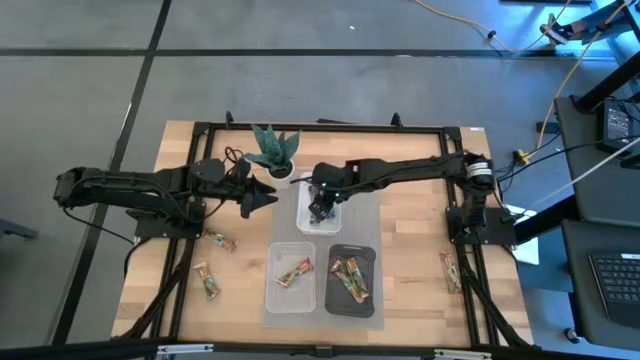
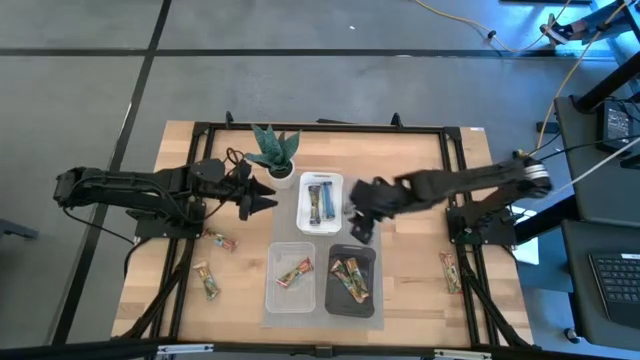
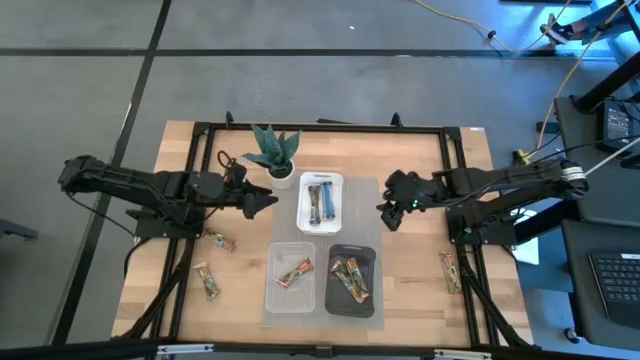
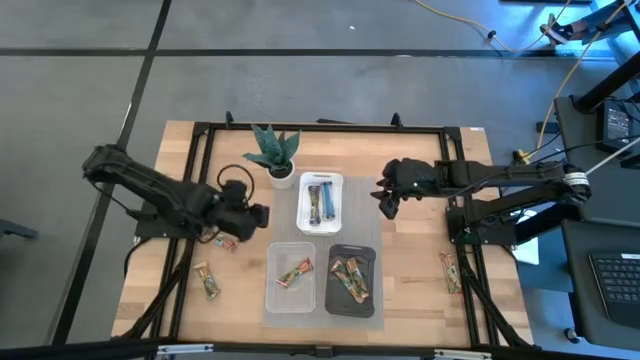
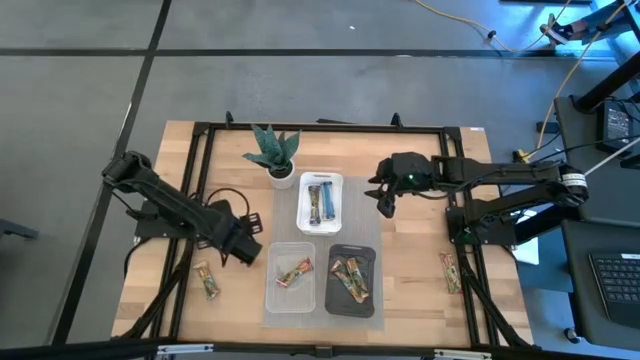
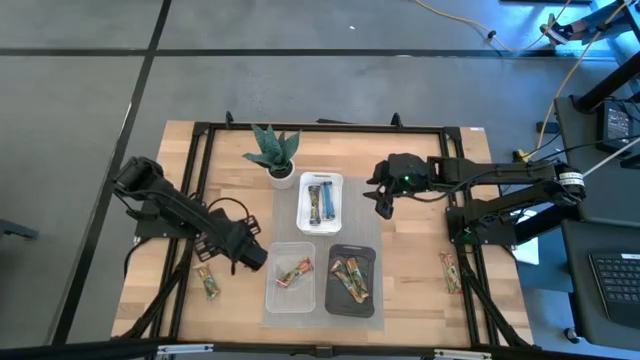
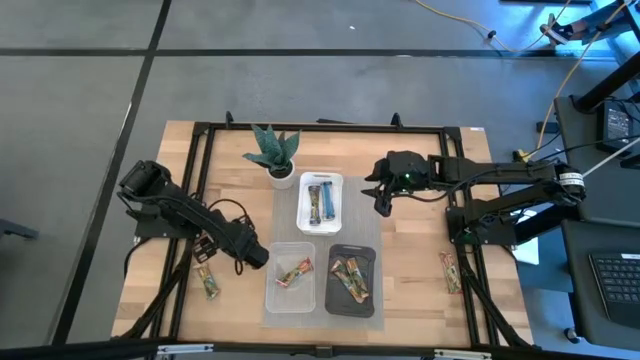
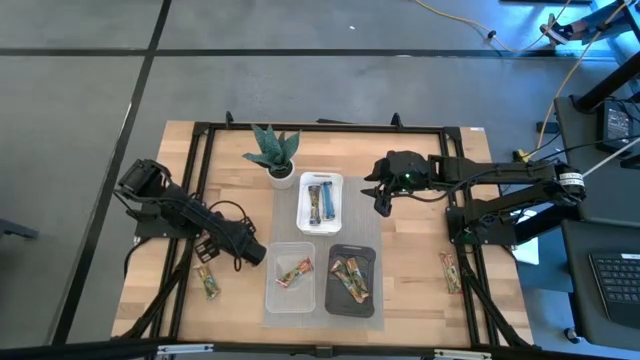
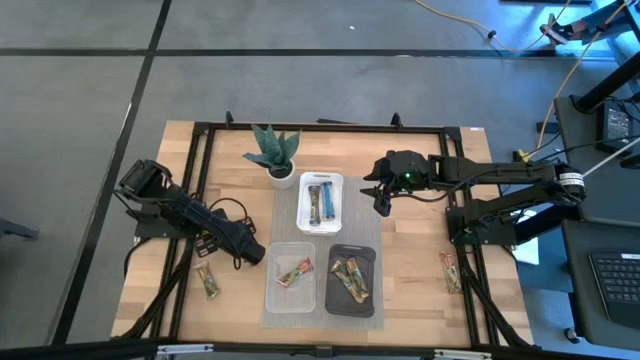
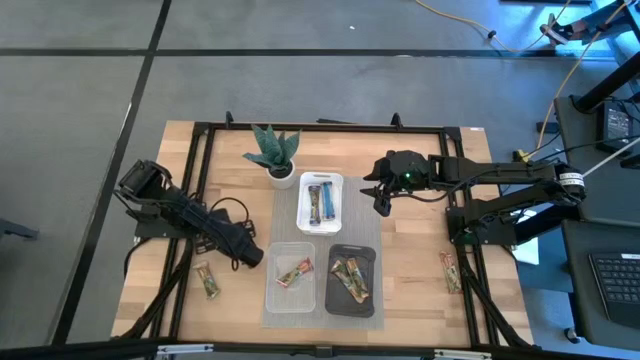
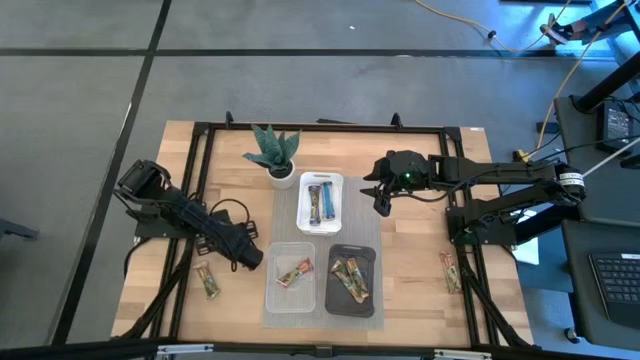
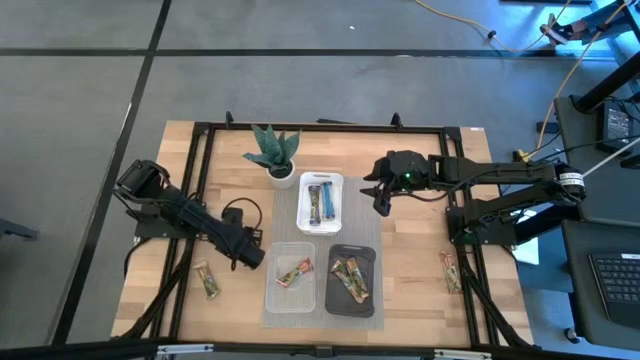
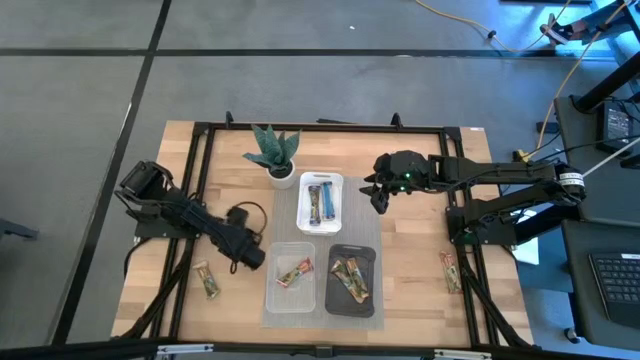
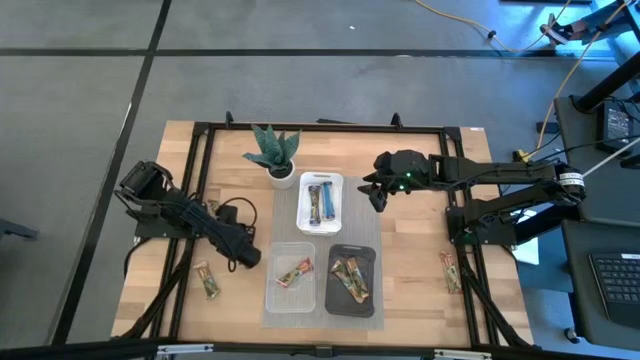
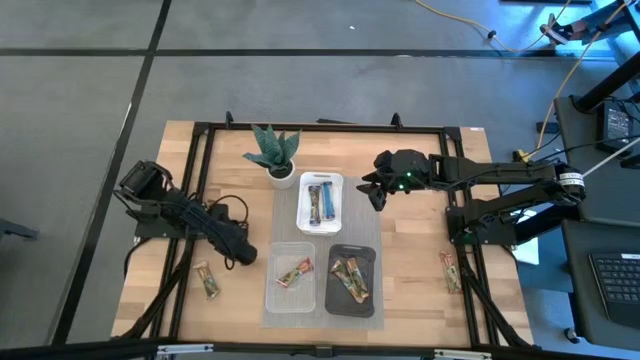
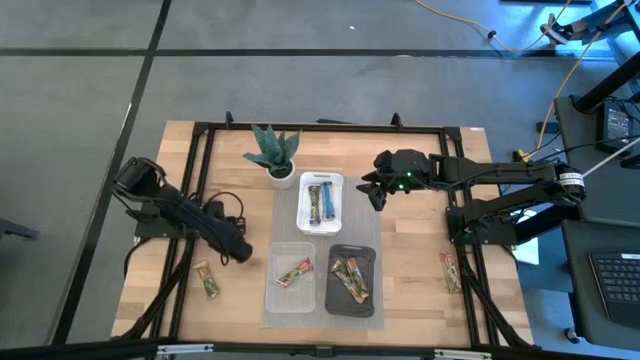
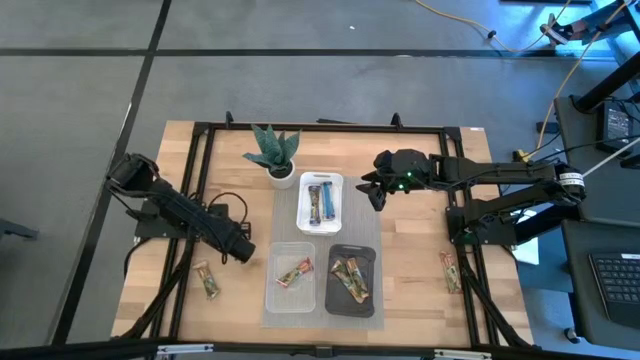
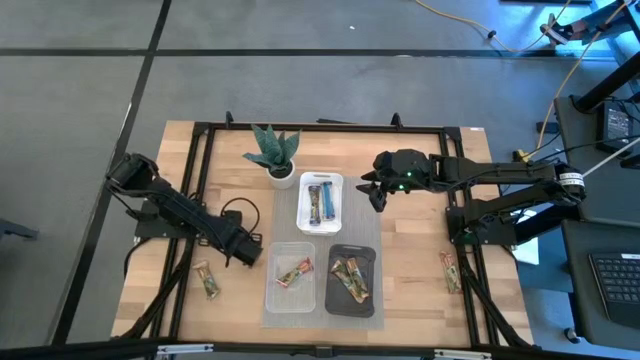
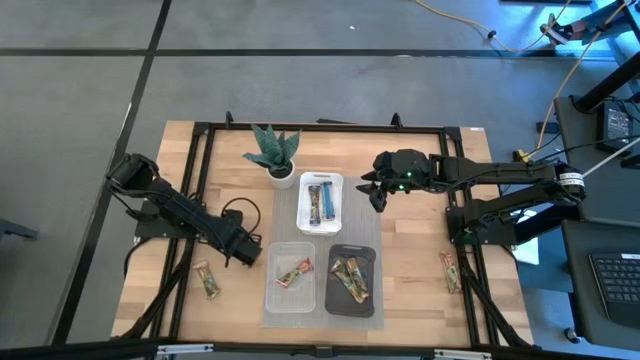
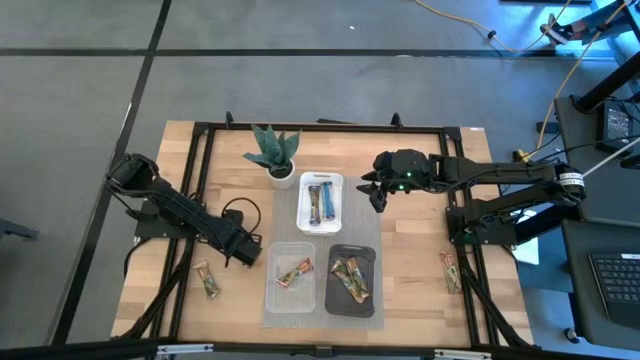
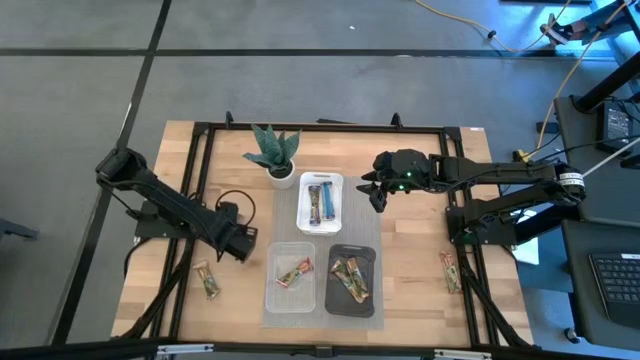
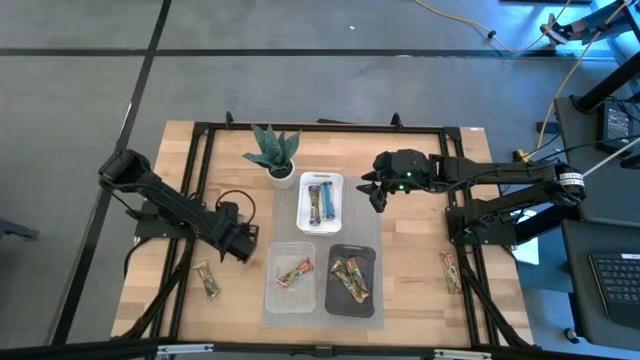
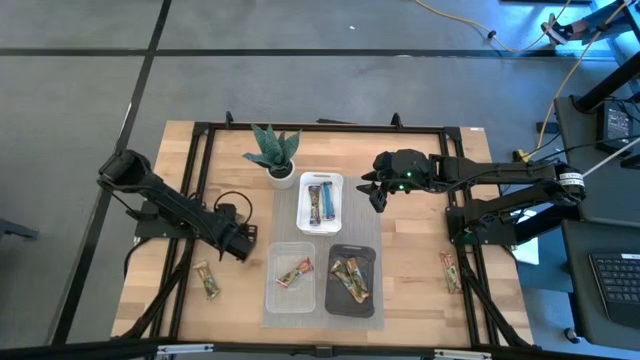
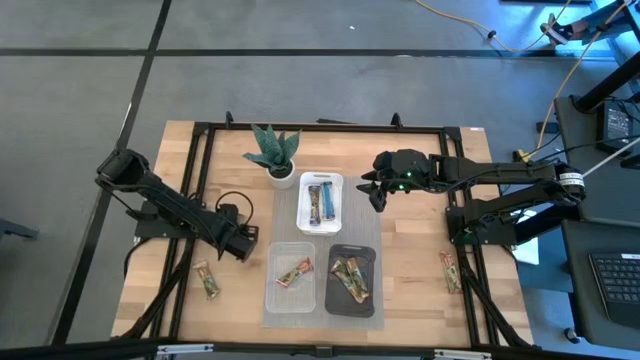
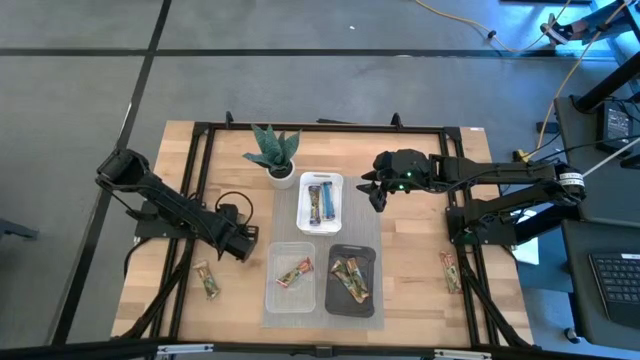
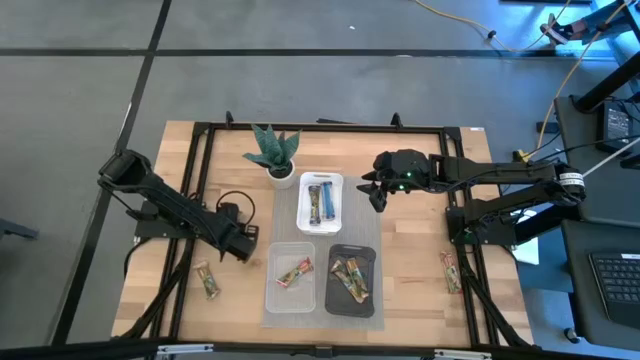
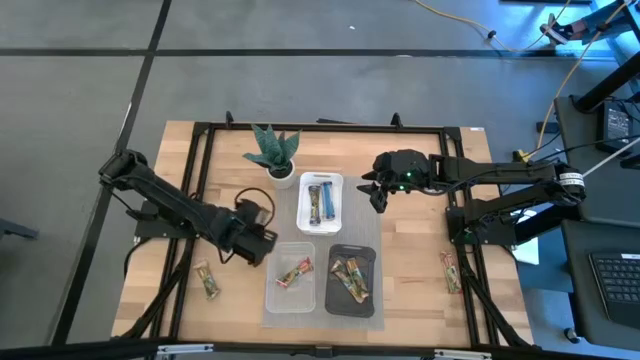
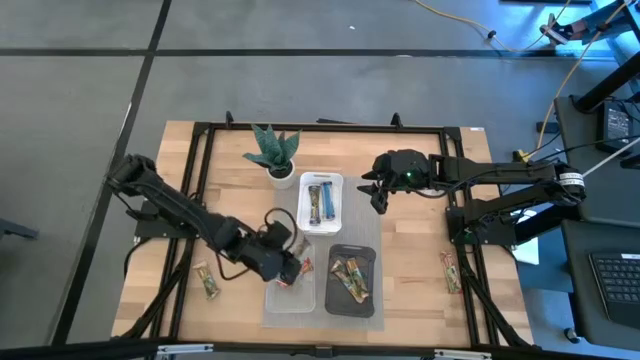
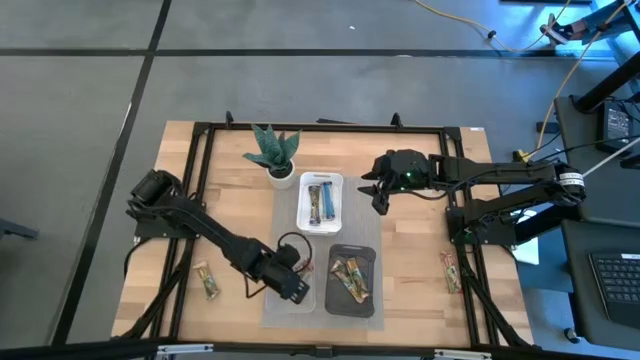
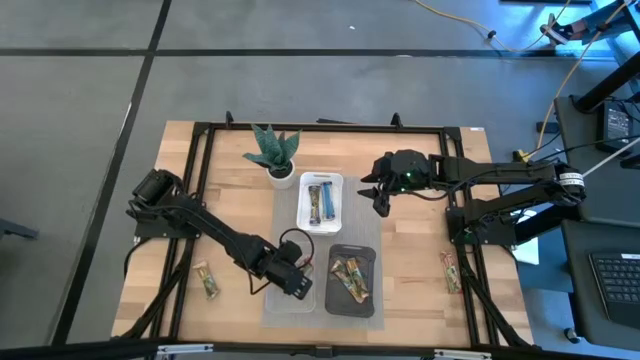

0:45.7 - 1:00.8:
Task: Pick and place Granola Bars by type
Put the left red granola bar into the transparent bin

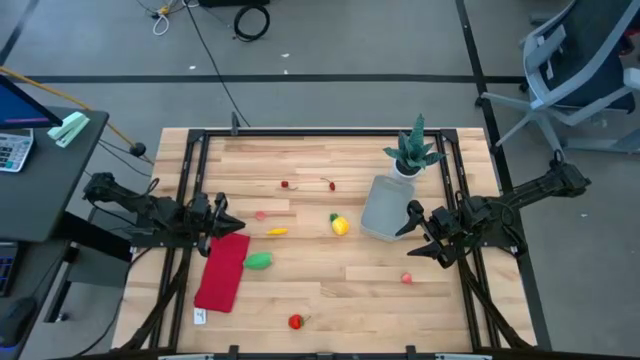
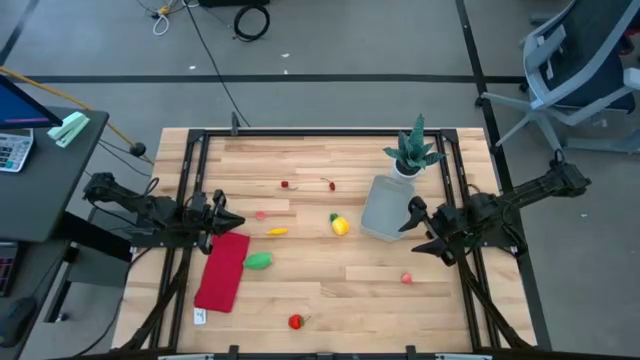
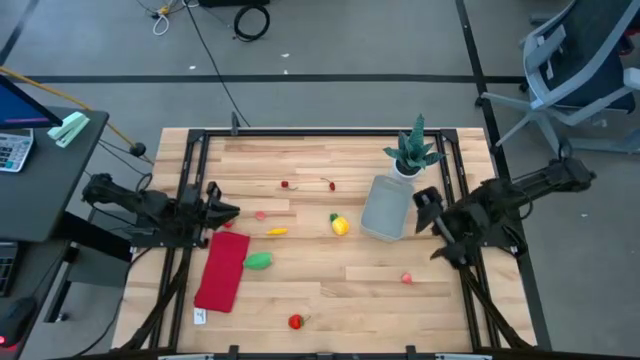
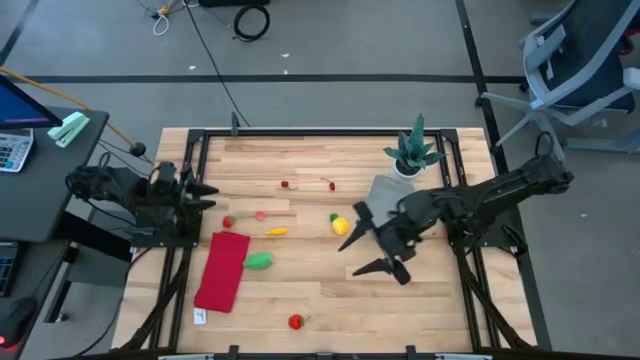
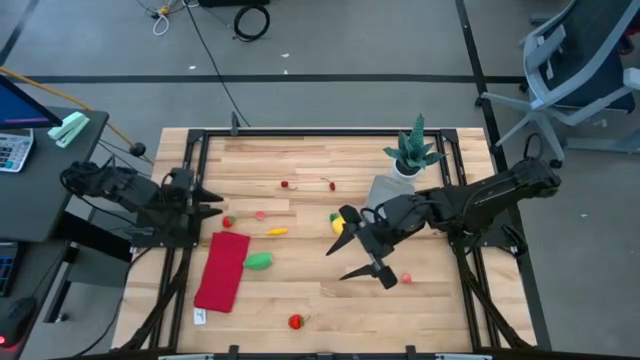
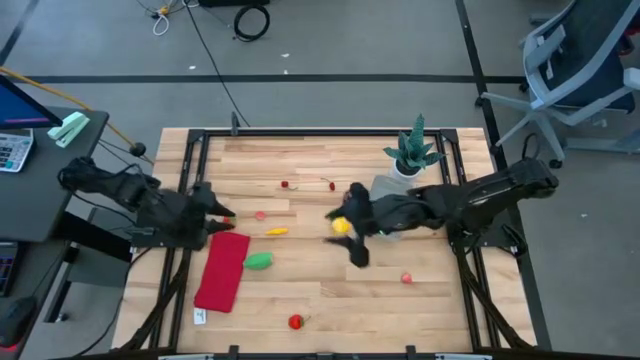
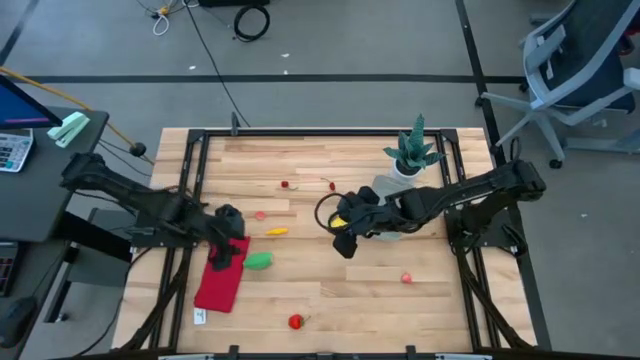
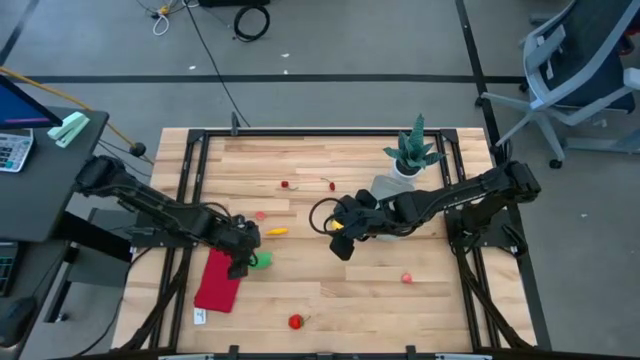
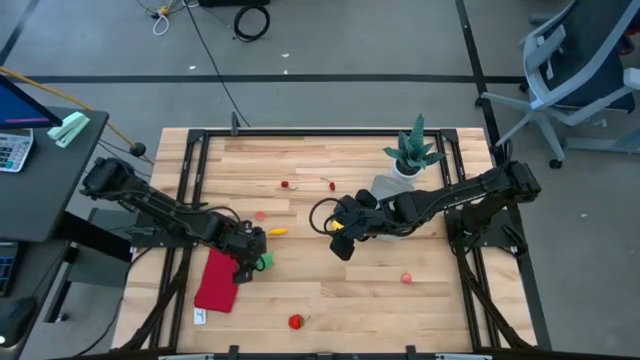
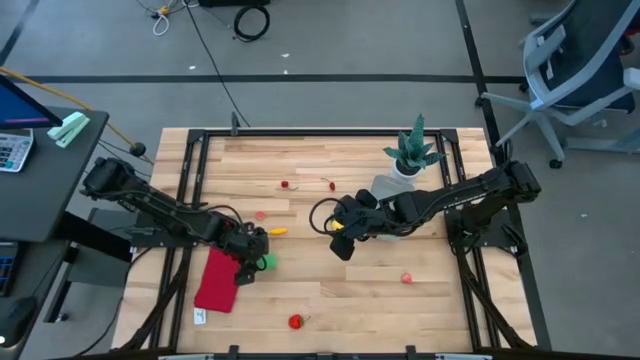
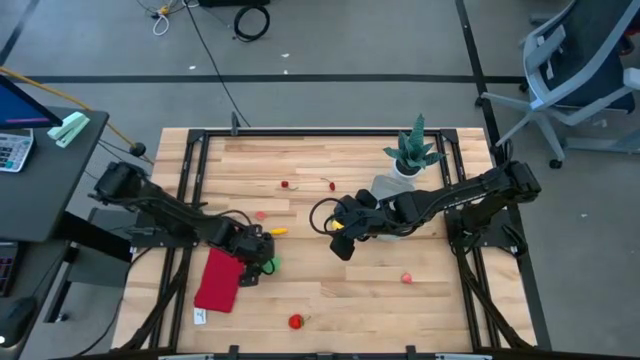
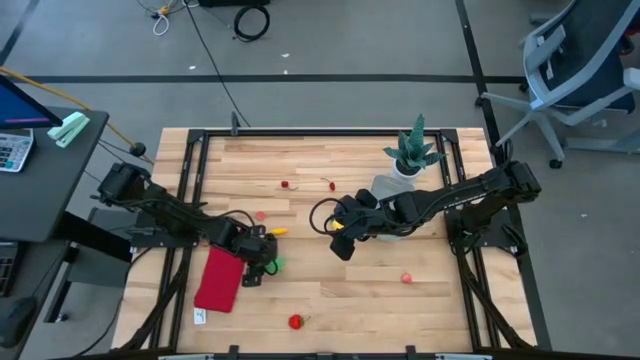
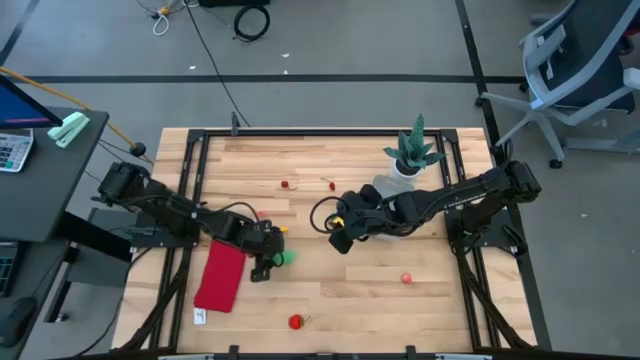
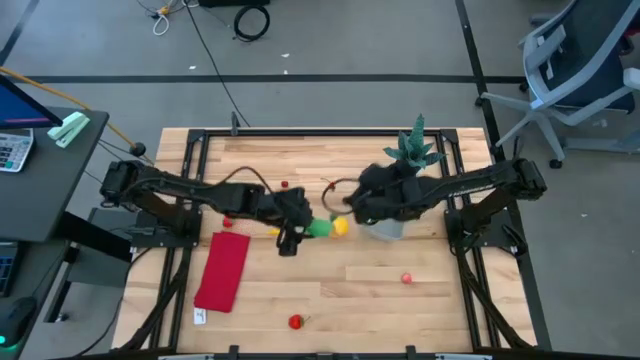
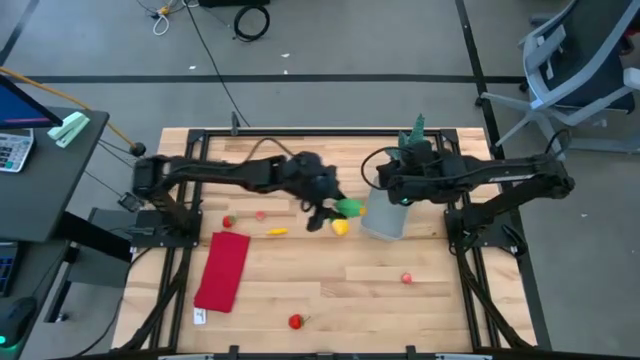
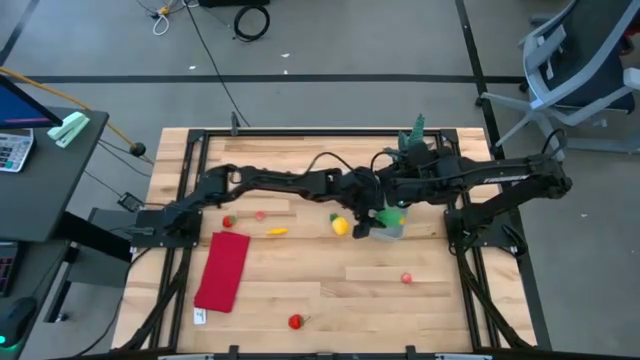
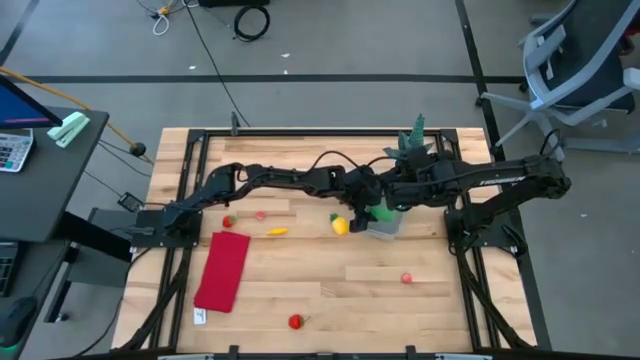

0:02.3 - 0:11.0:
Task: Pick and placing Produce into tupperware
Put the sweetcorn into the bin
